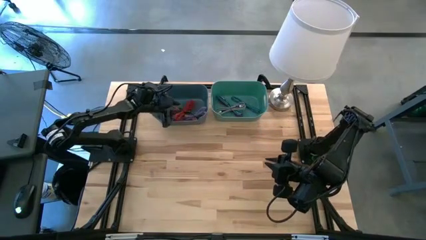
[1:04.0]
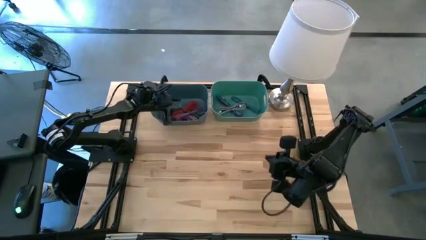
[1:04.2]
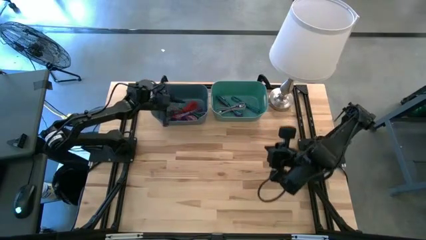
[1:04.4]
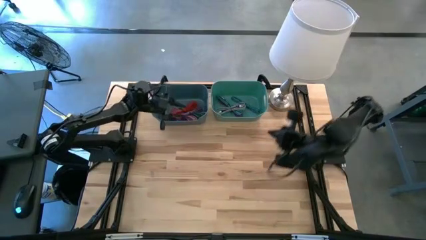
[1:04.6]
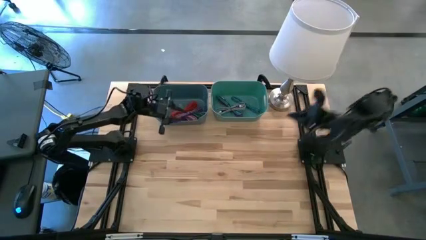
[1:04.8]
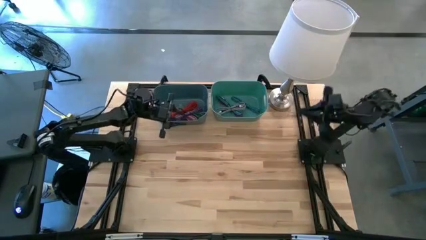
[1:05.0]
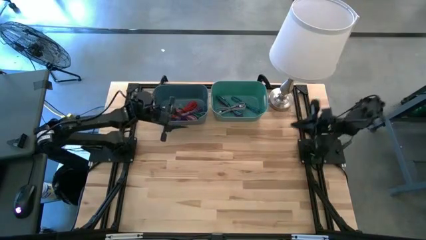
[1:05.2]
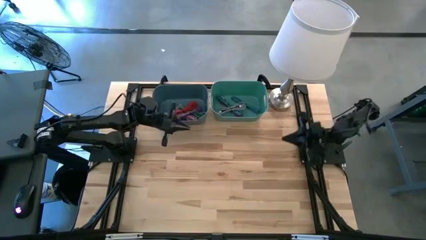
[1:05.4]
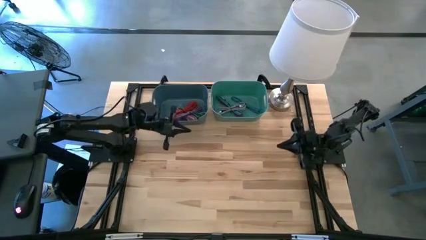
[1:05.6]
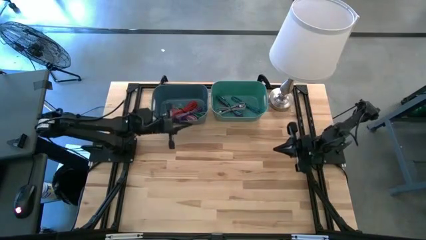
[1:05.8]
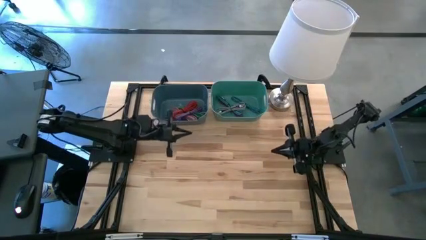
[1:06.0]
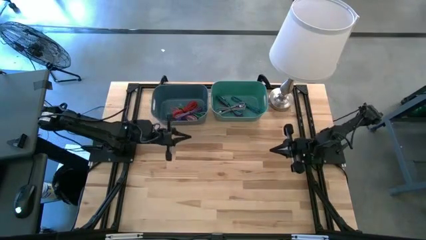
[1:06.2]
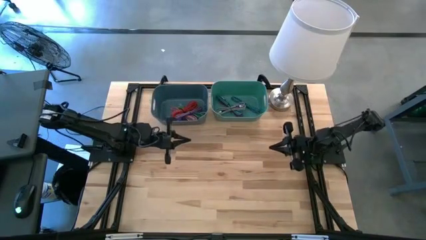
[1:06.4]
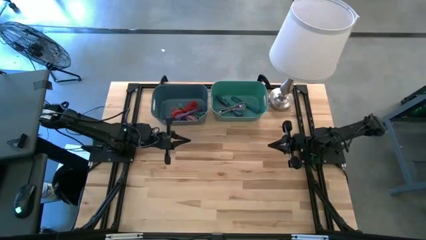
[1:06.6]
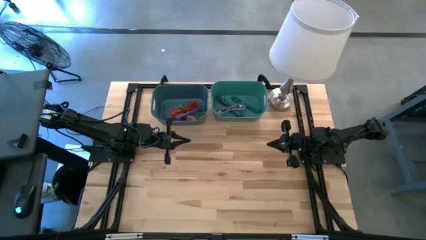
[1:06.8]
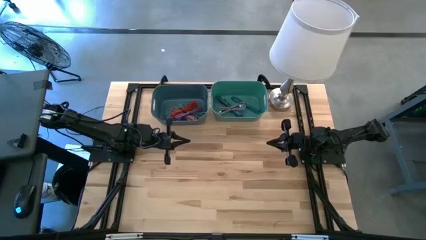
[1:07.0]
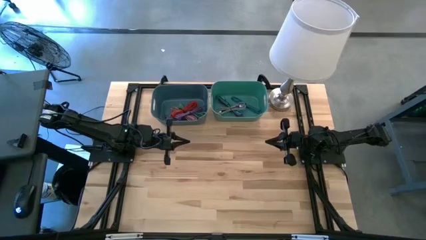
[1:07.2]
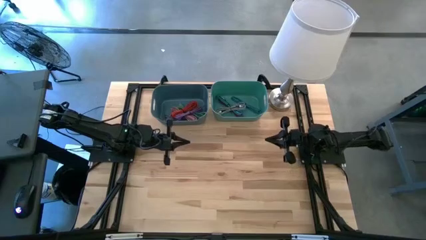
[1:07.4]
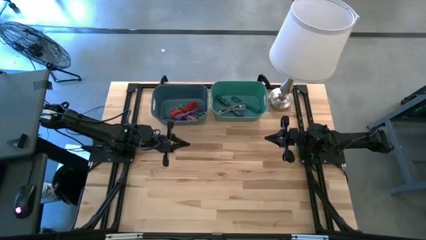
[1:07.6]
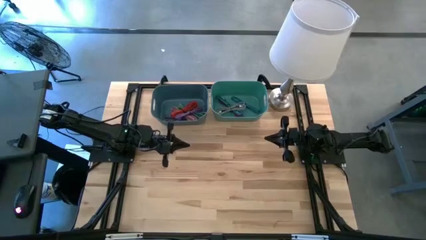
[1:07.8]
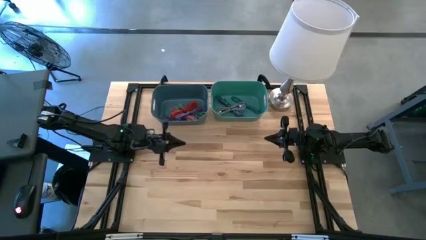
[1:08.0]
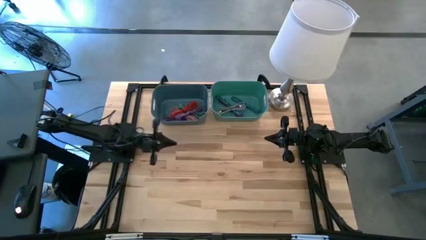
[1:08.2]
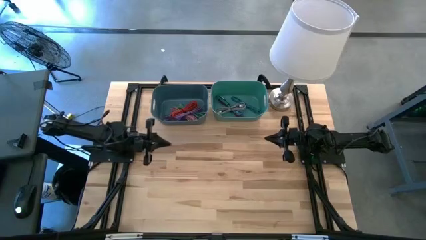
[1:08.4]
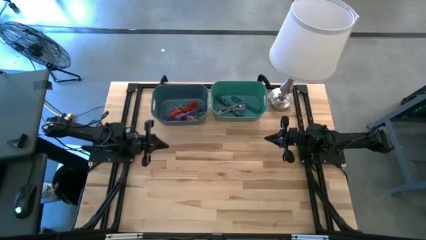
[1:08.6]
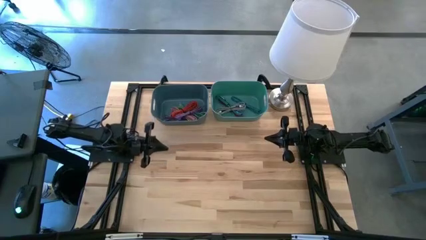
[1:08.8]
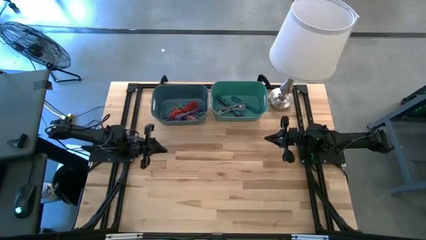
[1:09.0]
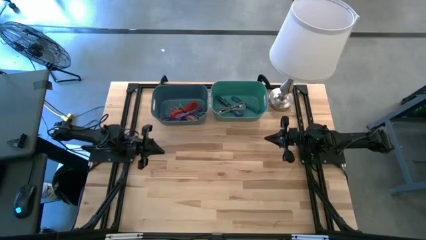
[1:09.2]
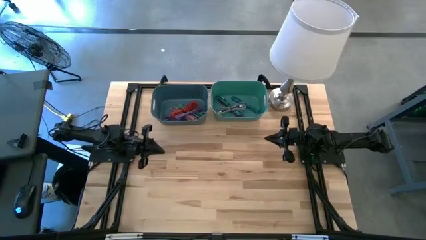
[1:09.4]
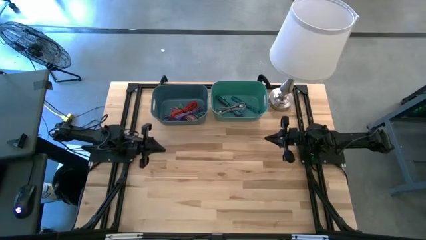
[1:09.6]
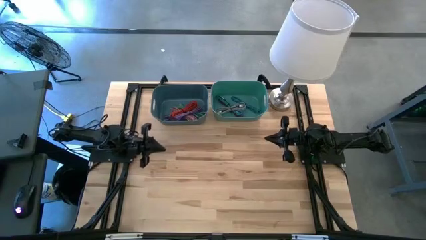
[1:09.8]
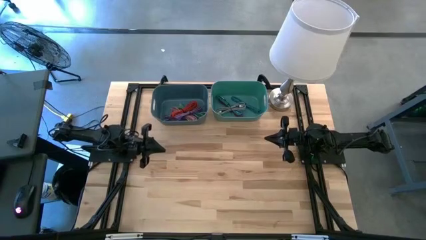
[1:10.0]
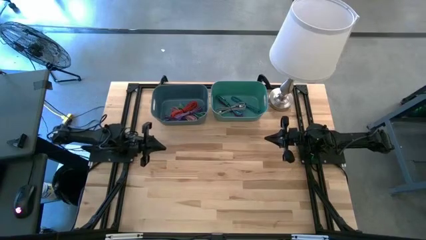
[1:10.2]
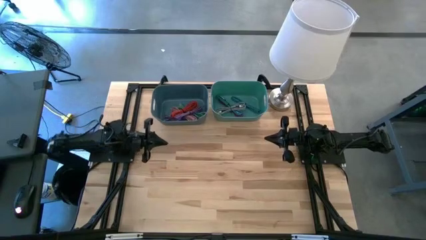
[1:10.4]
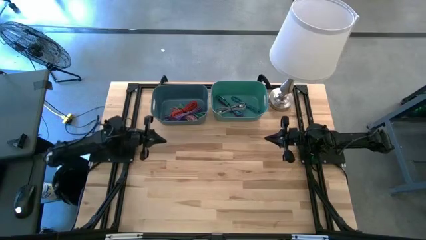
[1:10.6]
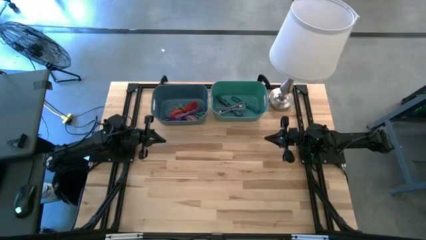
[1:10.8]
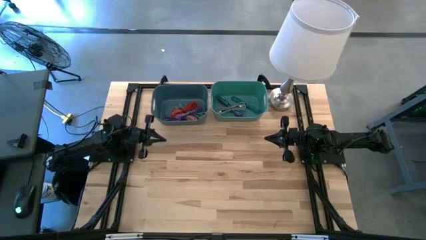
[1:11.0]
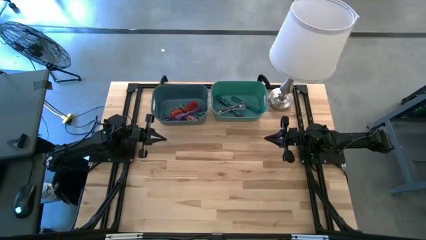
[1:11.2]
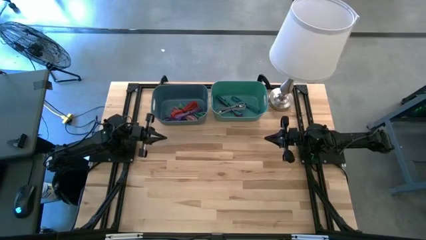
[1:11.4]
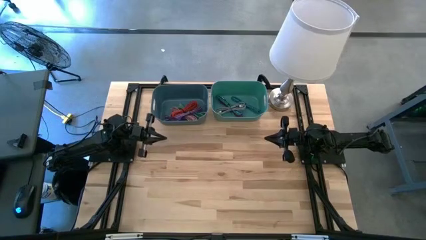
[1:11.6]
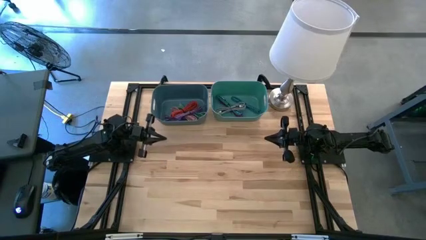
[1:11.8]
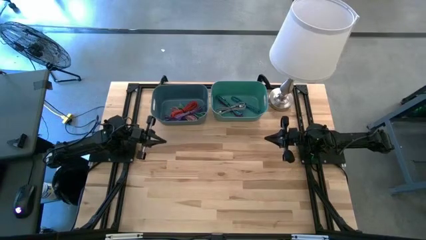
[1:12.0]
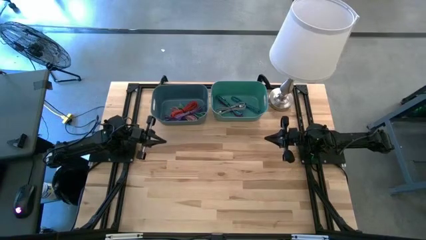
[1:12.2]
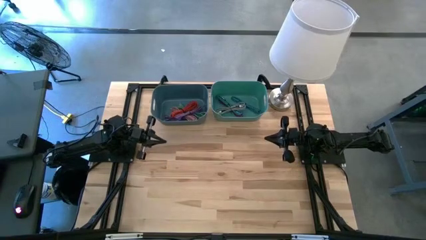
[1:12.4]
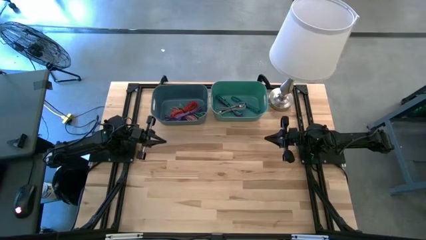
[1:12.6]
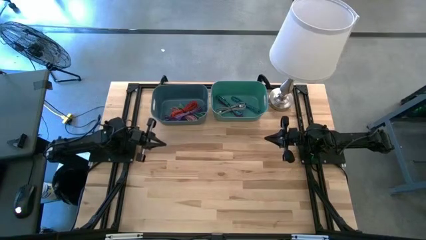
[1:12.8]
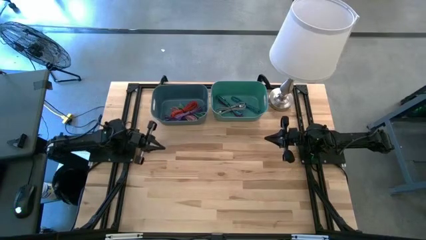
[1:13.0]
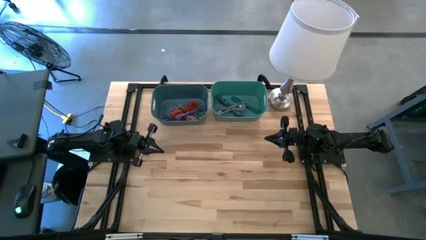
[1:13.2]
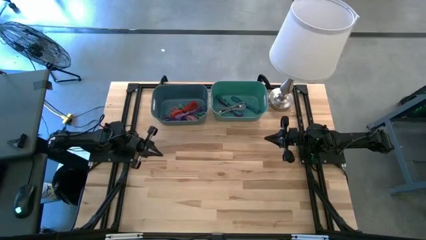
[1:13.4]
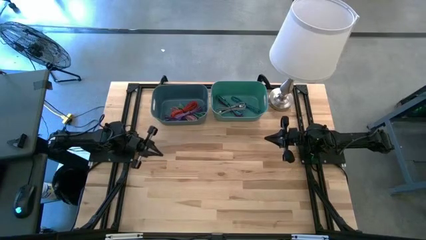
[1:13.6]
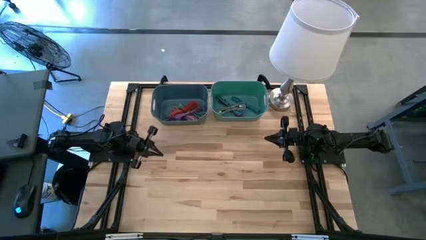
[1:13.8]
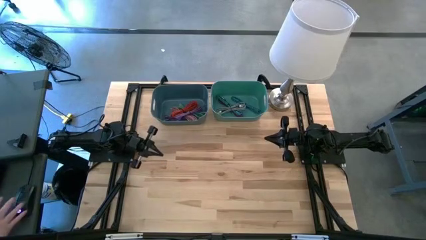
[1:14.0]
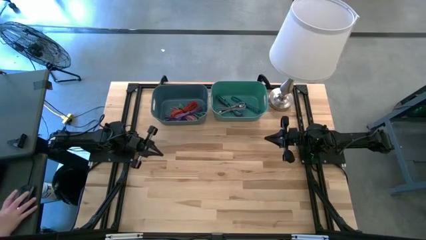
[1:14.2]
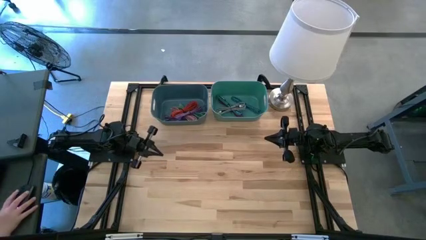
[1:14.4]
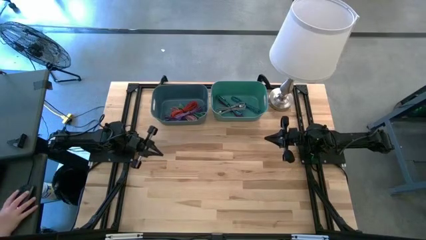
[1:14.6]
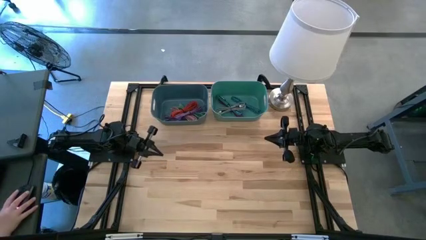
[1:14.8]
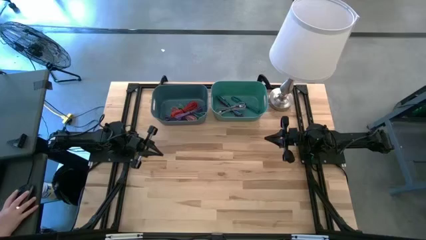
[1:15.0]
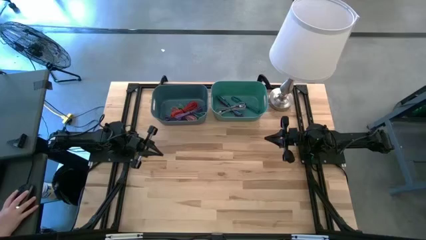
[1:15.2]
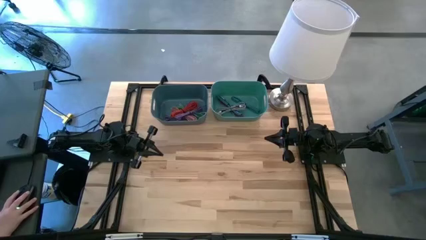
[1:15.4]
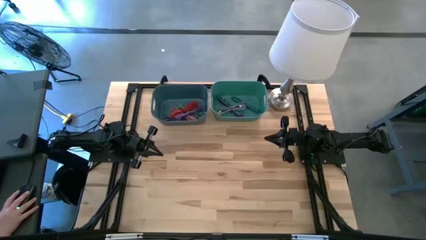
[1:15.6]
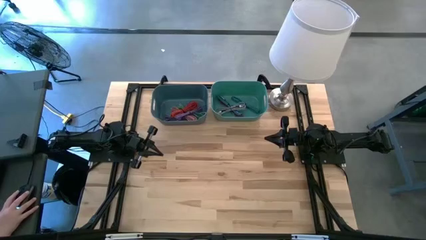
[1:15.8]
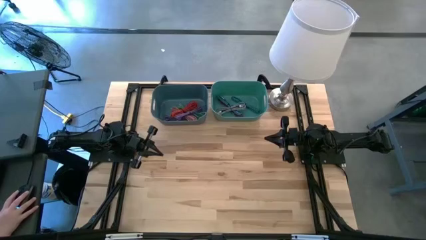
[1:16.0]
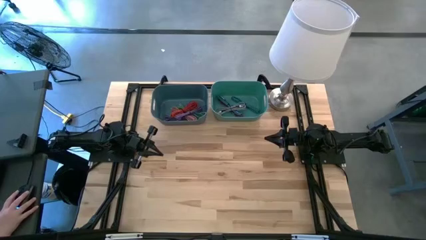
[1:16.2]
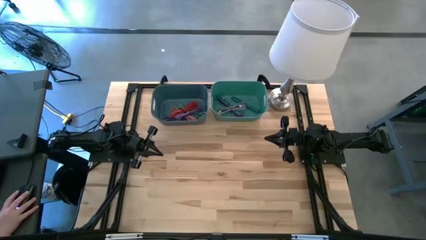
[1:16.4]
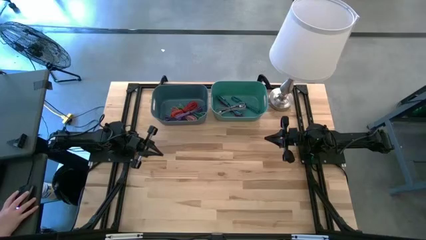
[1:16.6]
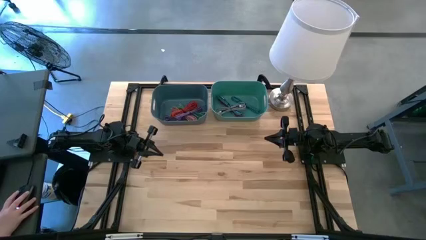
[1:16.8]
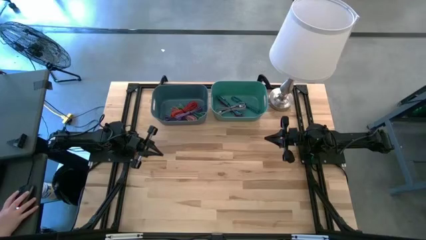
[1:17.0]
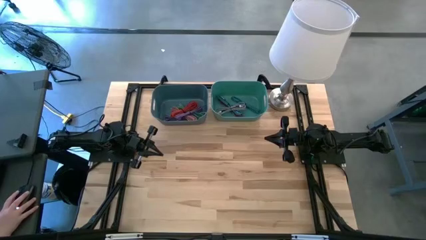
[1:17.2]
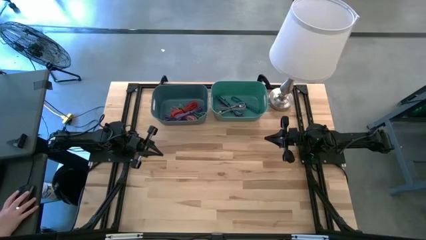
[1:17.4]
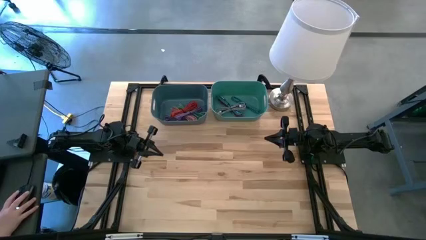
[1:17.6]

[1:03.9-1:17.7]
Task: Pick & Place USB Port
Return to Home Position

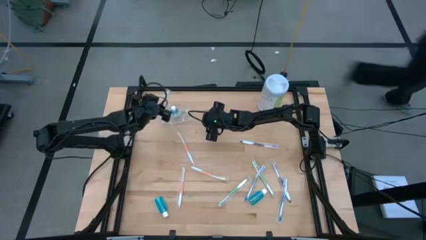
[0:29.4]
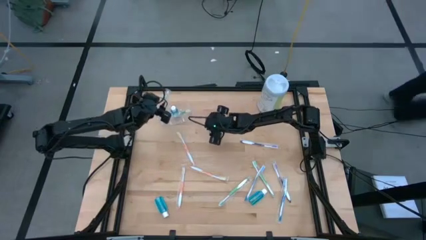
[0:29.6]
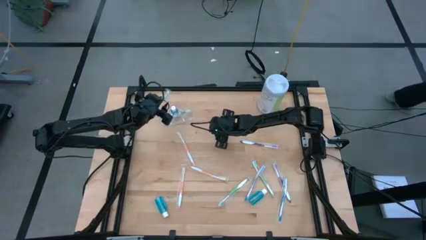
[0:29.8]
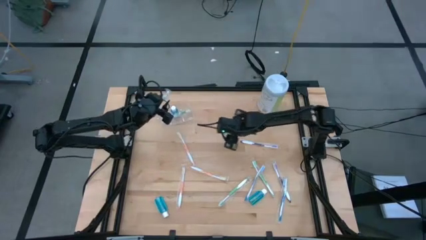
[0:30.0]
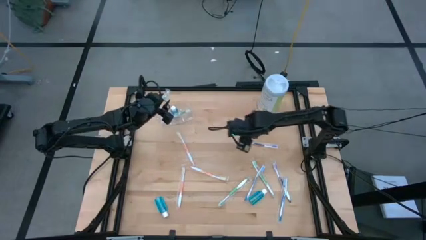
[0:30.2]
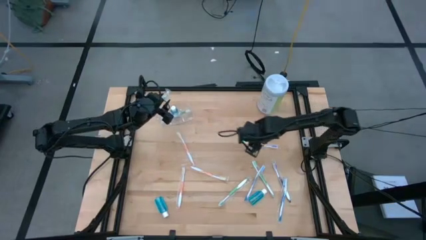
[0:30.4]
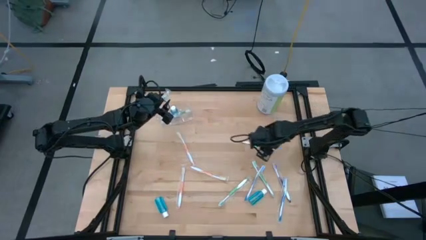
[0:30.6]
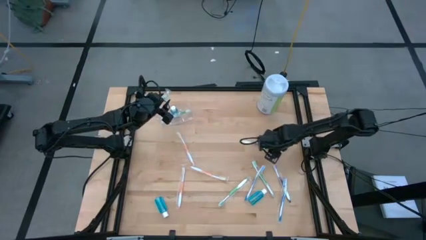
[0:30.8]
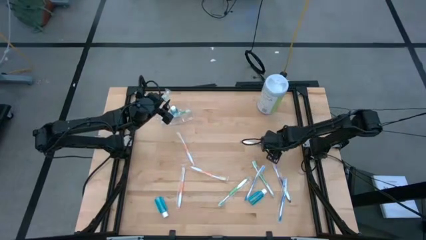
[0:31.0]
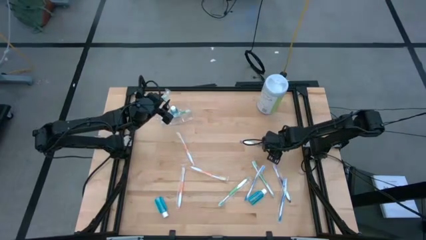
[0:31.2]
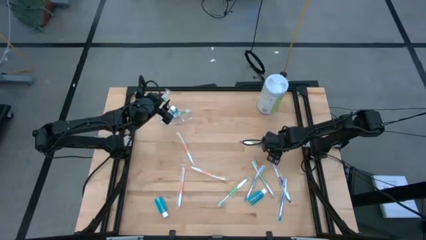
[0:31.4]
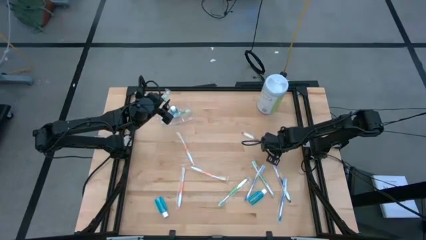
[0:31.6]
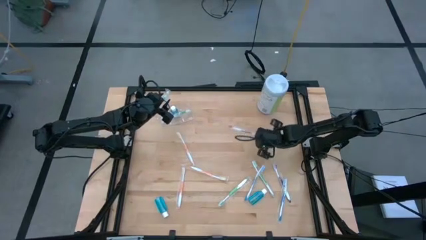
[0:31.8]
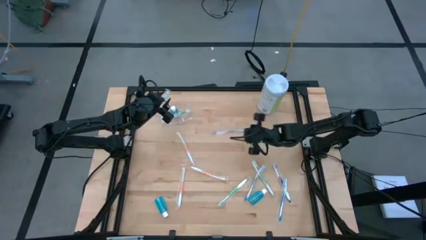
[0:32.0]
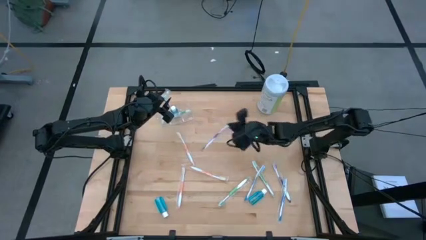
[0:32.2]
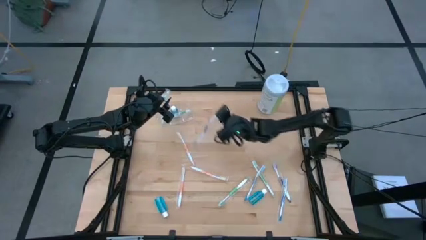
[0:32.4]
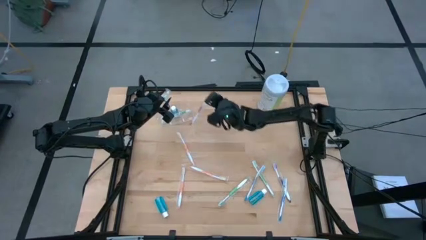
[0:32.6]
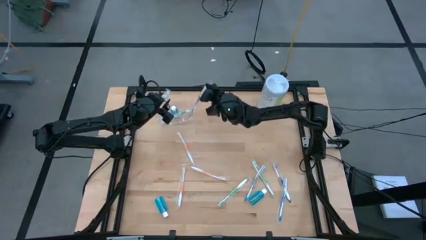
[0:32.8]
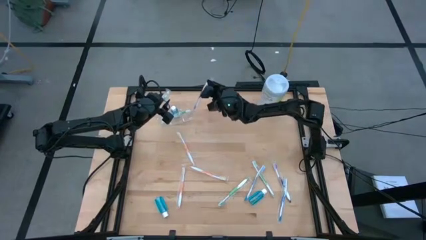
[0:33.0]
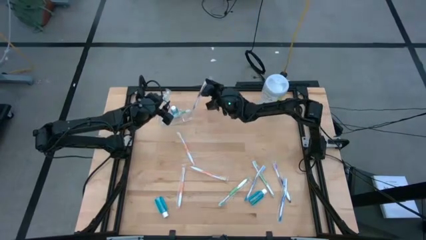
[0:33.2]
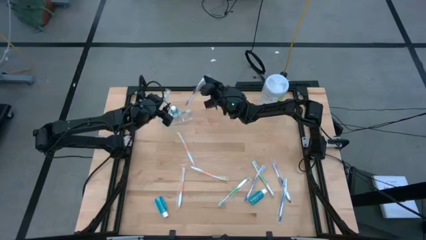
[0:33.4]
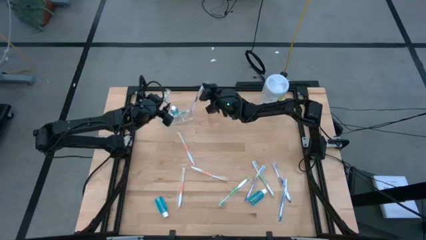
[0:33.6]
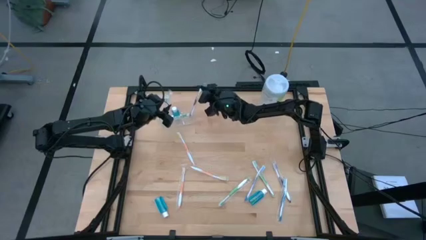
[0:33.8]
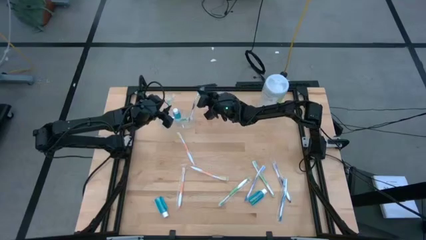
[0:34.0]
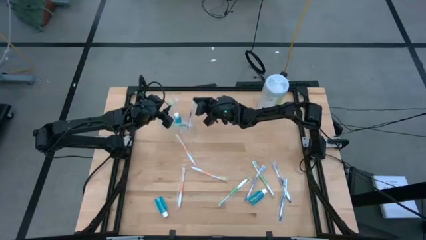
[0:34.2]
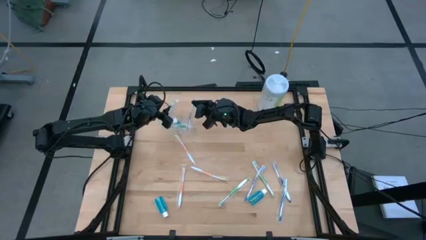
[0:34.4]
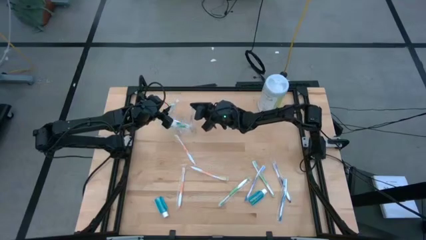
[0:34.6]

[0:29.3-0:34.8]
Task: Pick & Place toothbrushing station
Put the purple toothbrush into the transparent organizer
